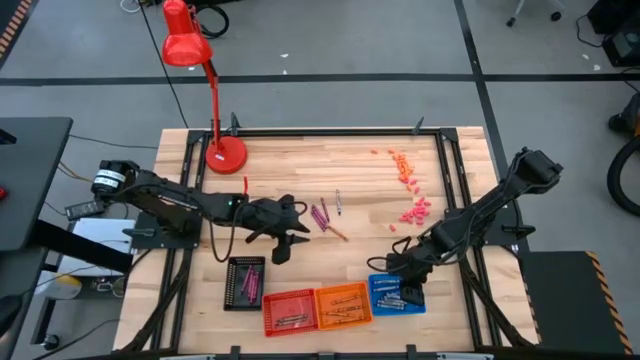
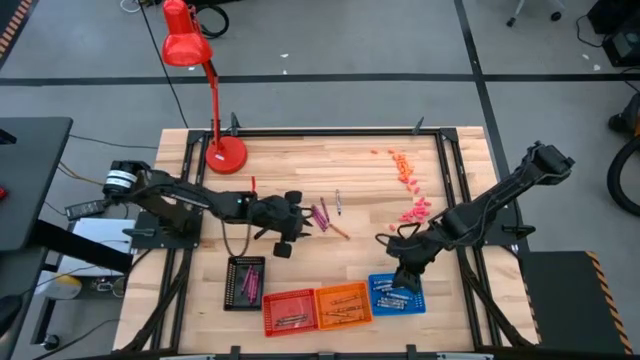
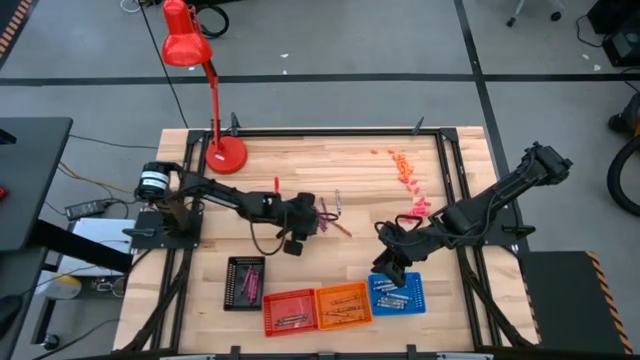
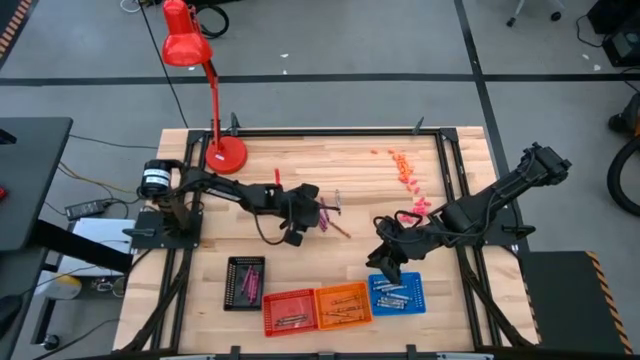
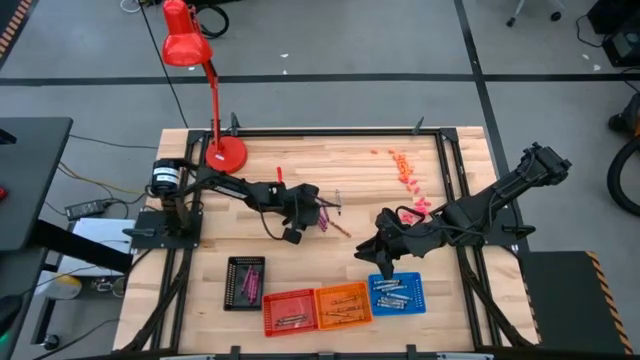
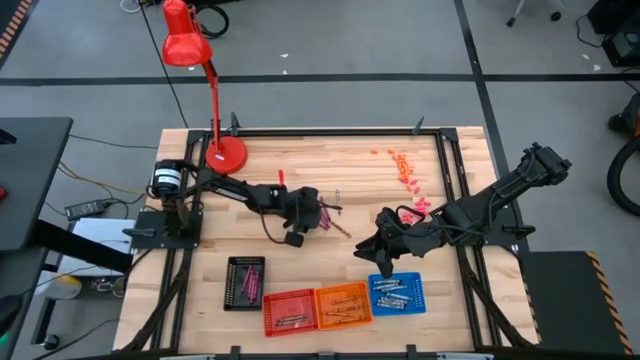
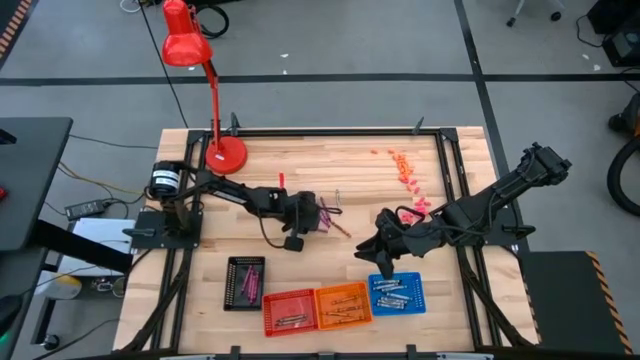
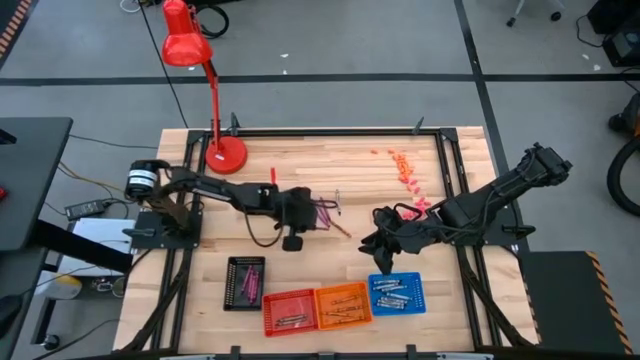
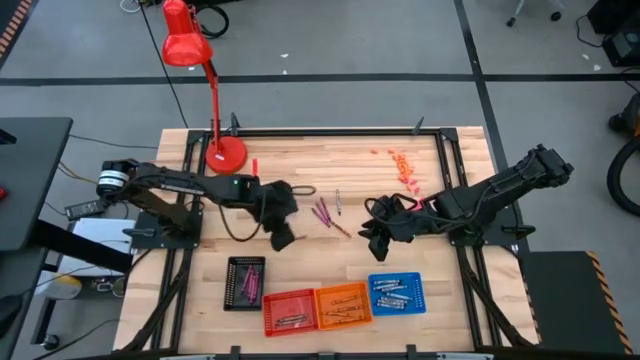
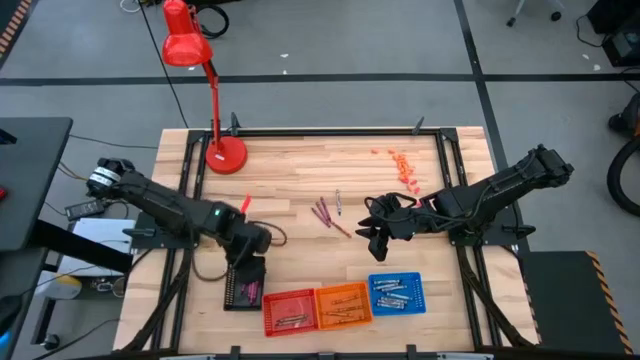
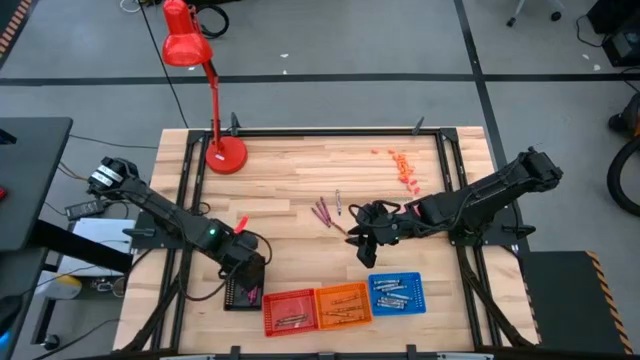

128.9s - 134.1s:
Task: Sort crayons
Put the violet crayon into the black bin

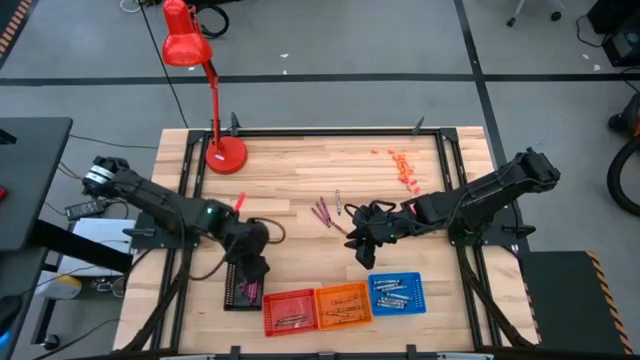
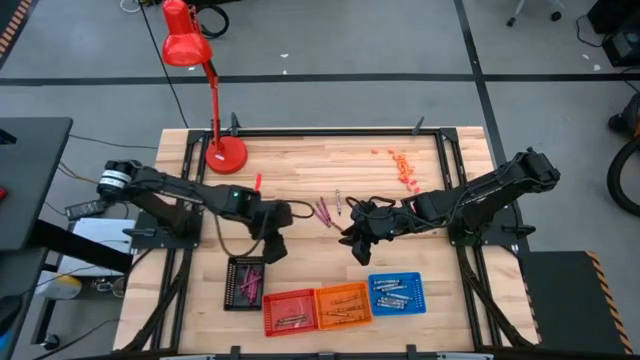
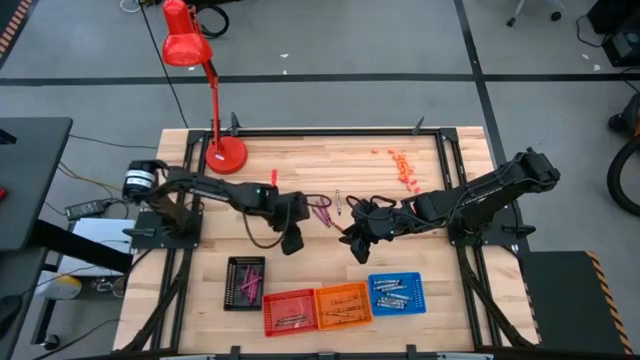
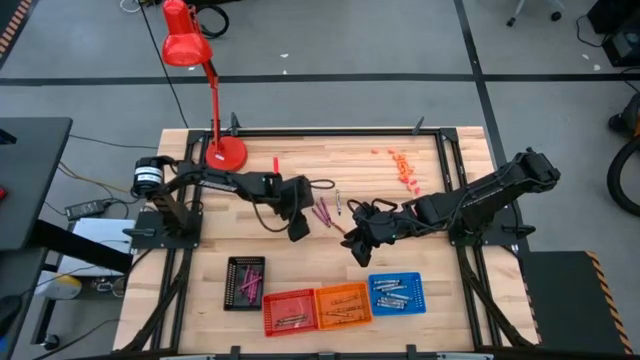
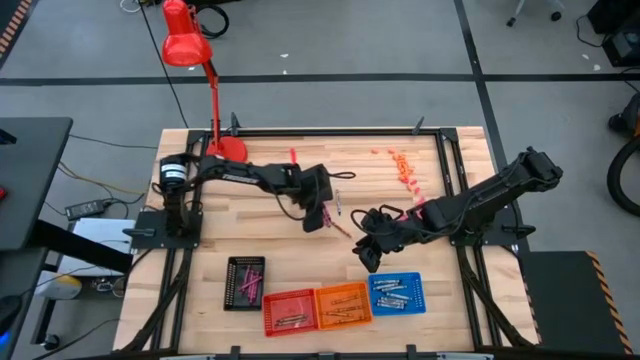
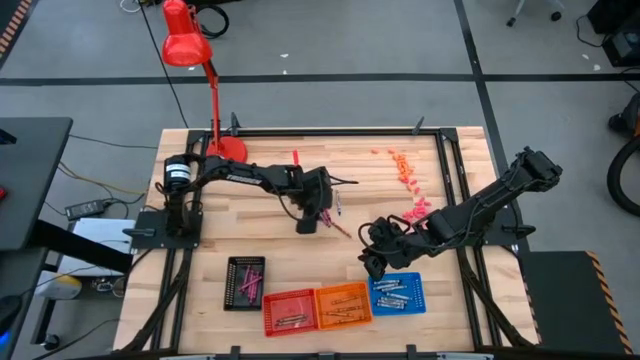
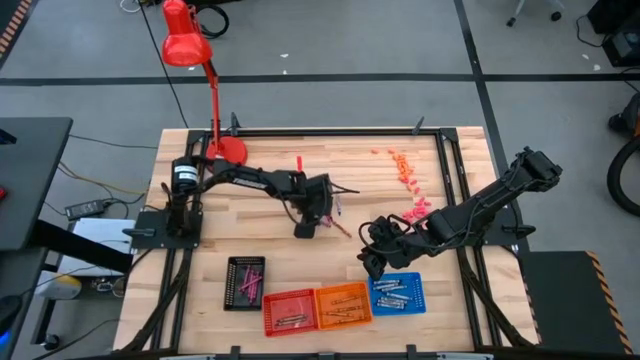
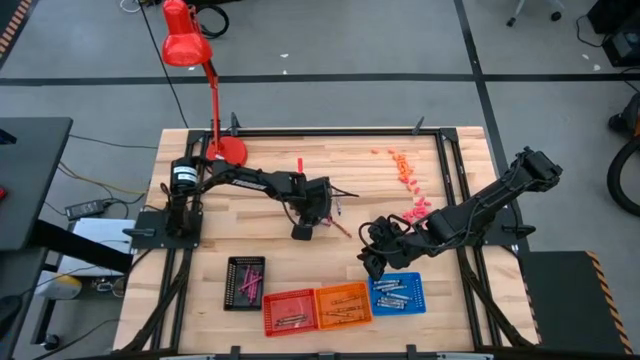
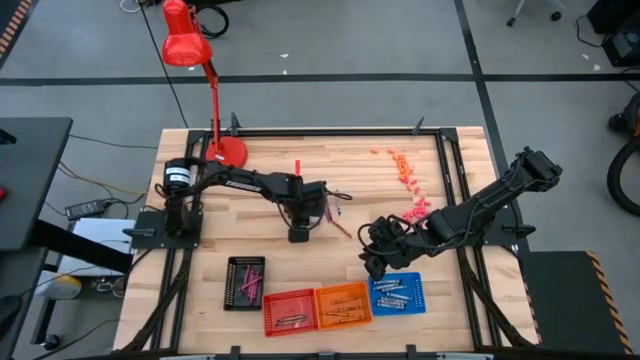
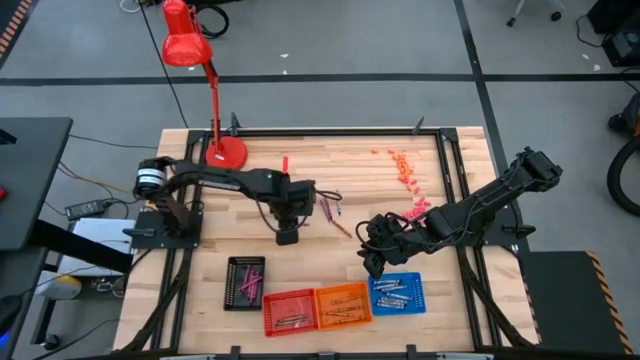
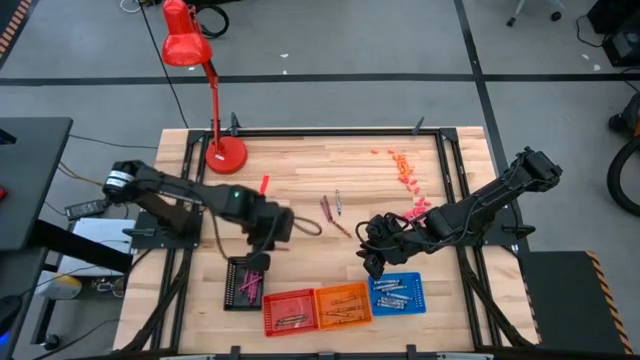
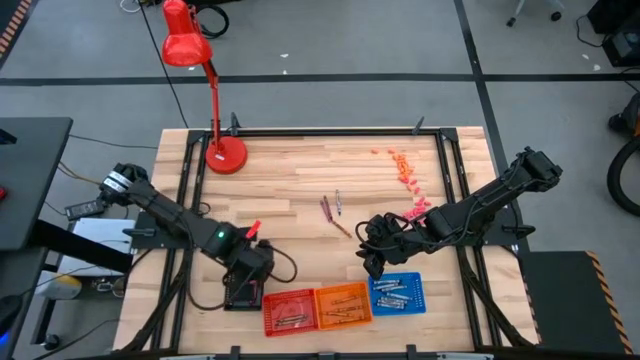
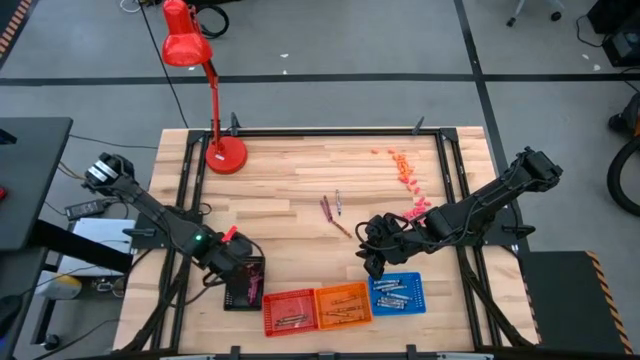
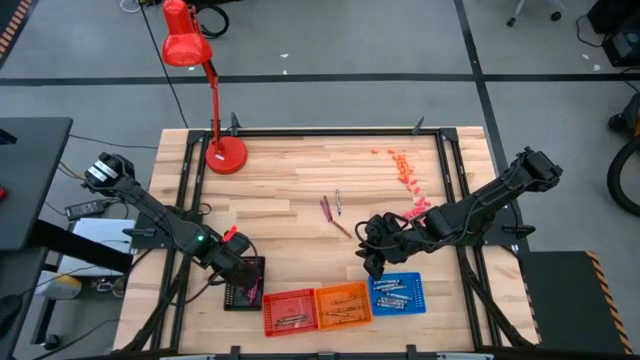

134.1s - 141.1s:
Put the violet crayon into the black bin

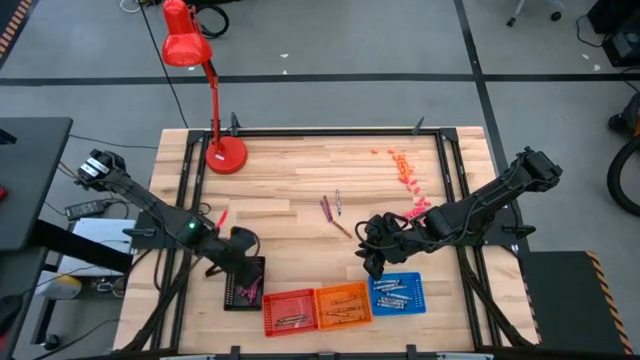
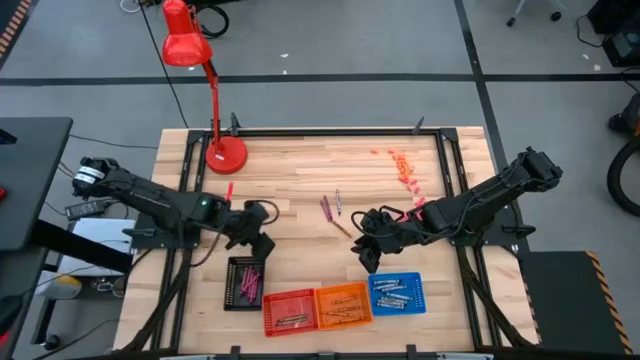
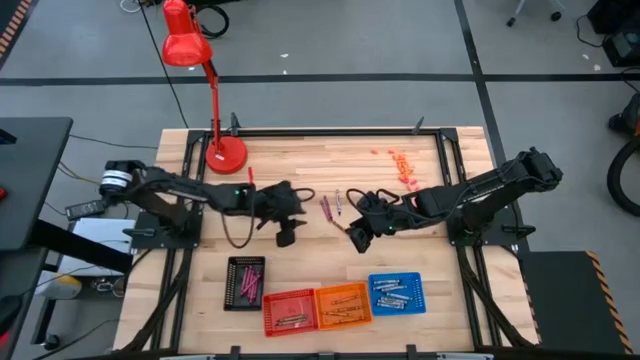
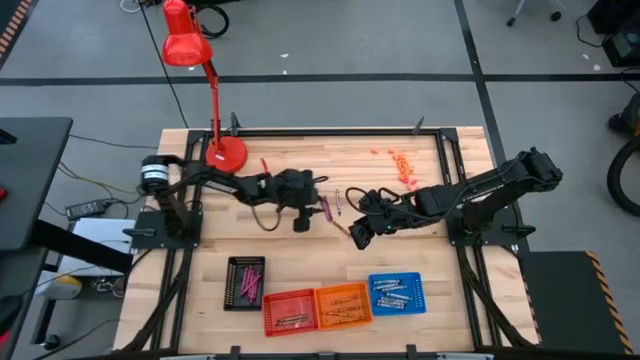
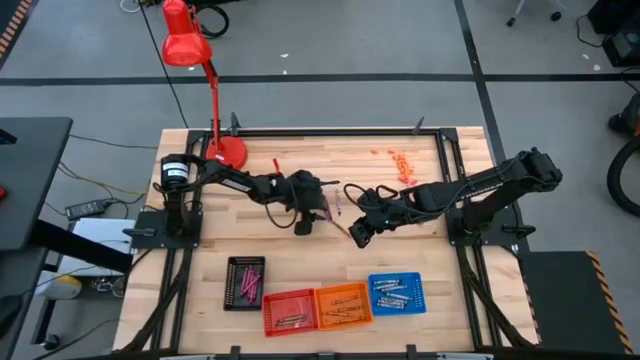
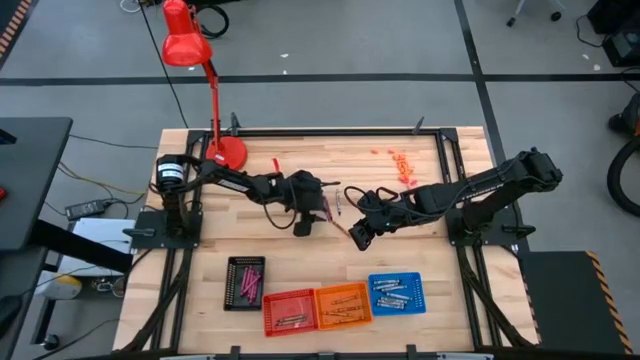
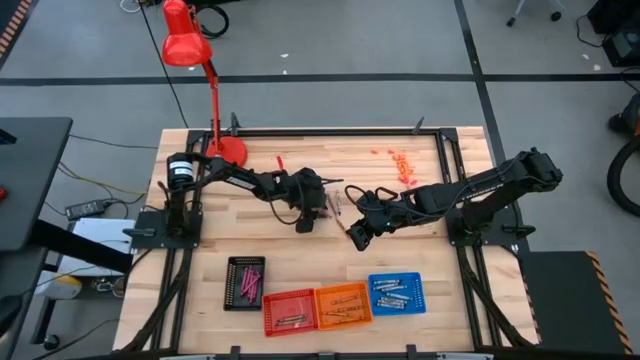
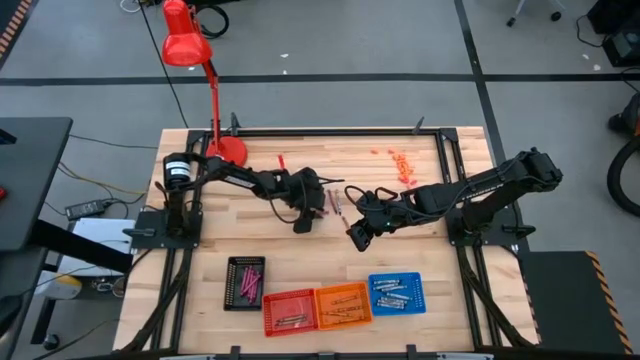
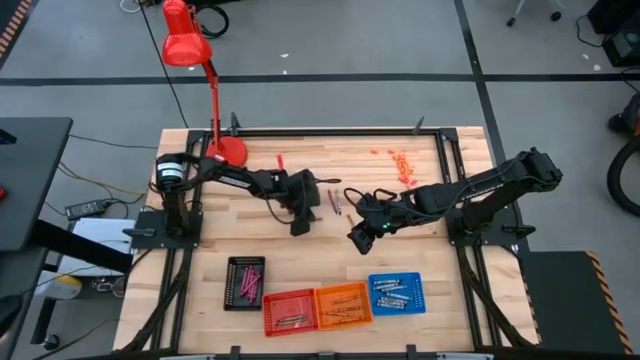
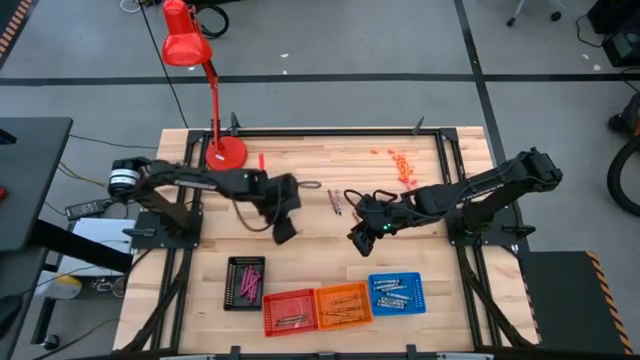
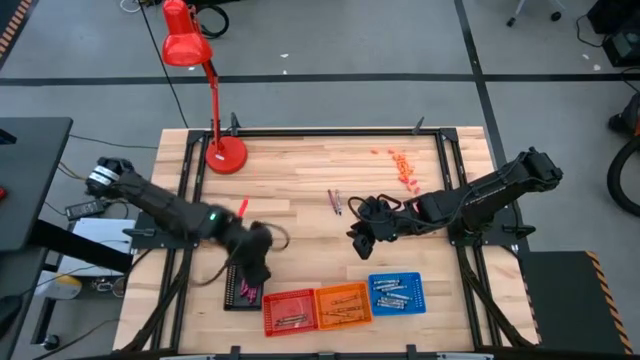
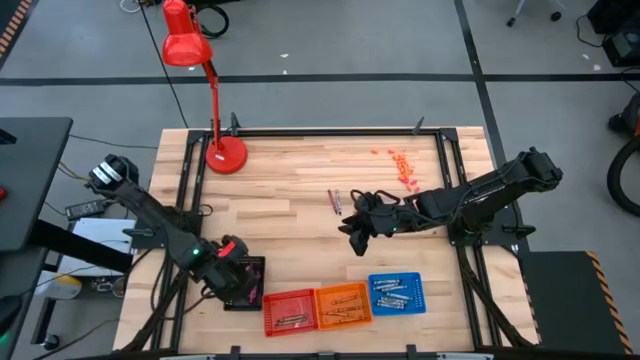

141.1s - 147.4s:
Put the violet crayon into the black bin

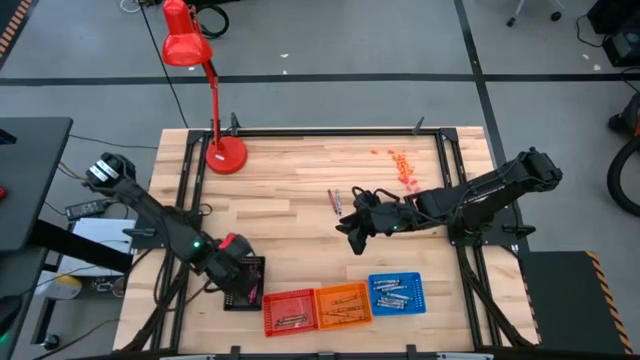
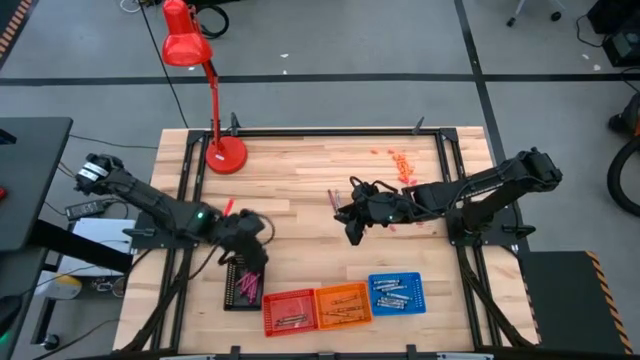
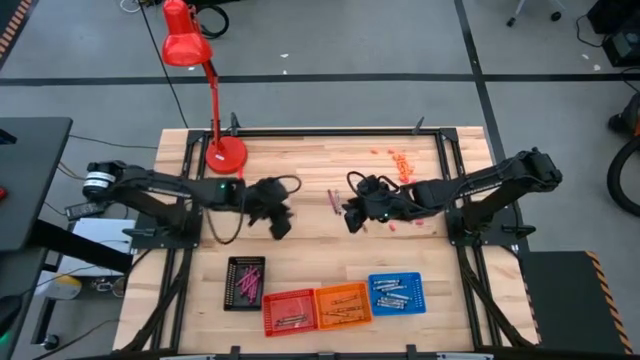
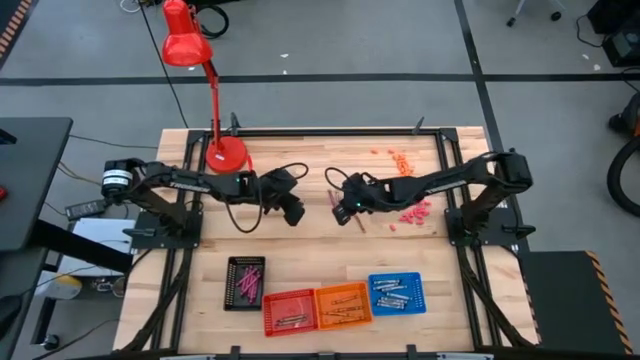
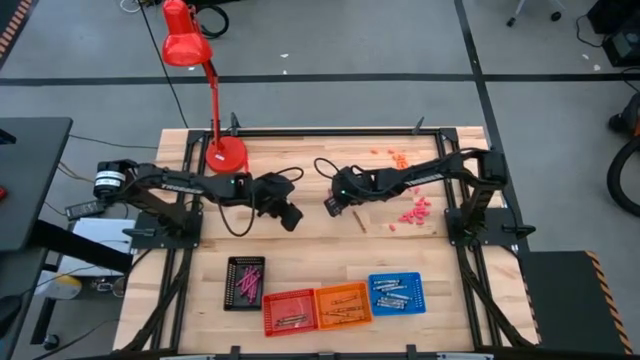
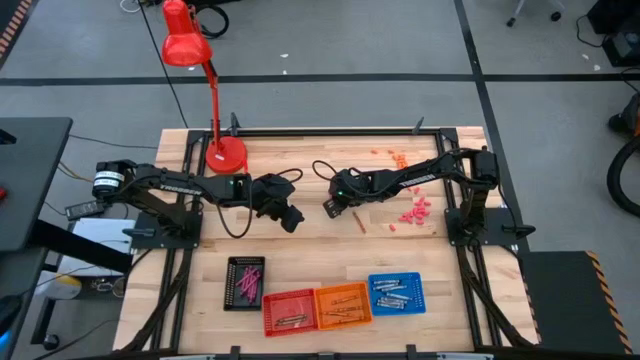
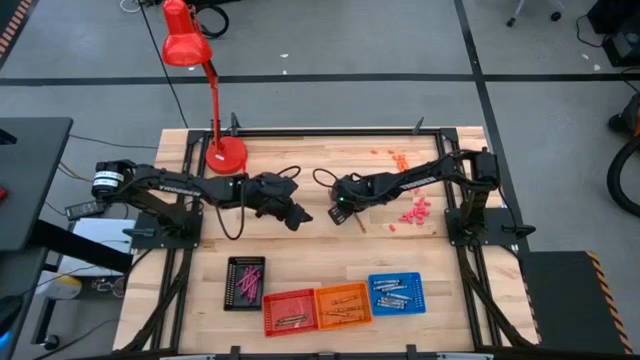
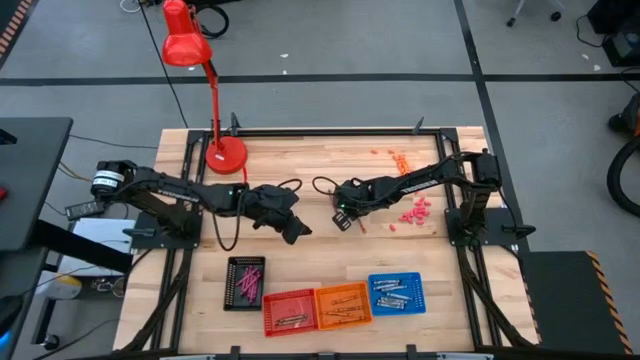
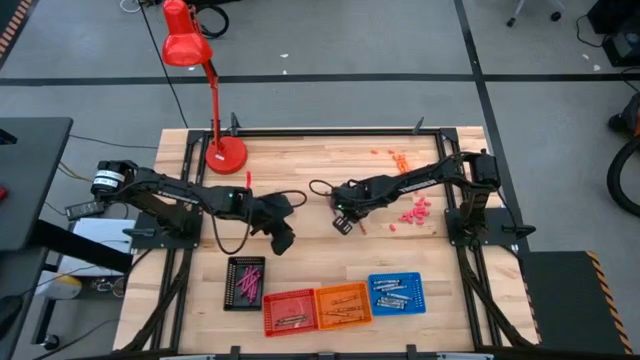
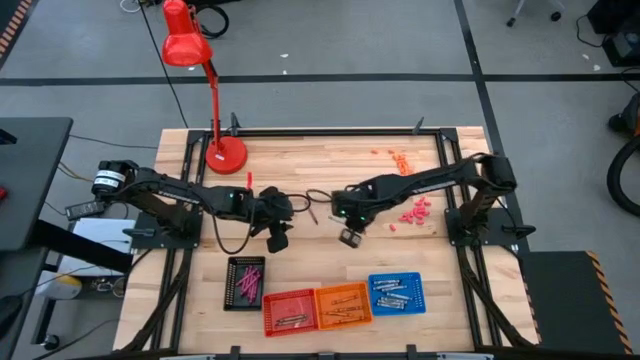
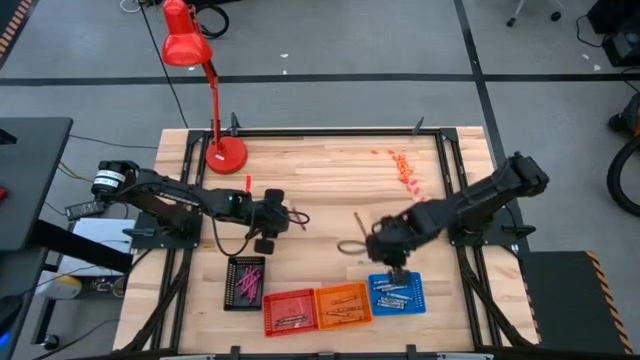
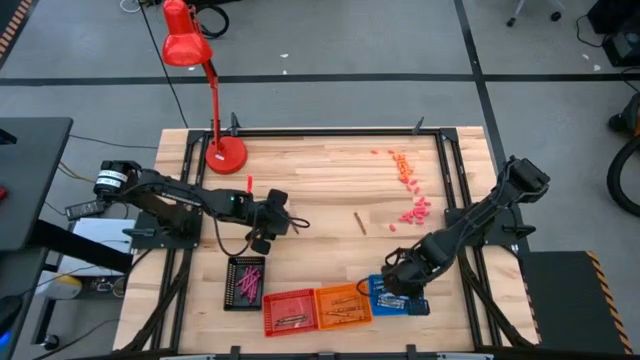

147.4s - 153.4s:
Put the black crayon into the blue bin
